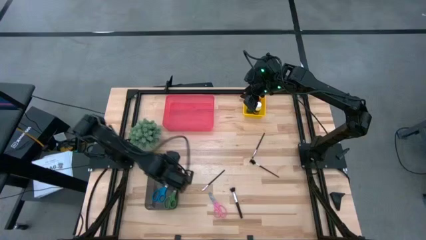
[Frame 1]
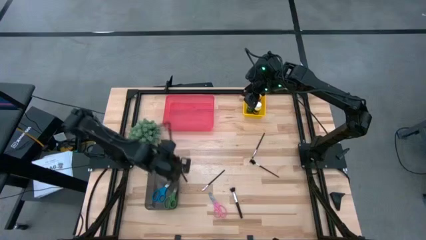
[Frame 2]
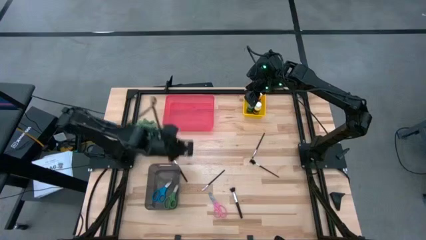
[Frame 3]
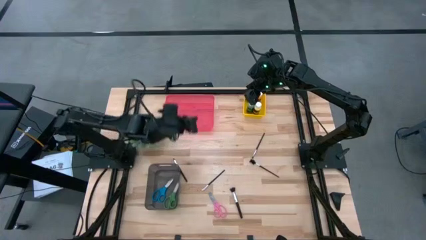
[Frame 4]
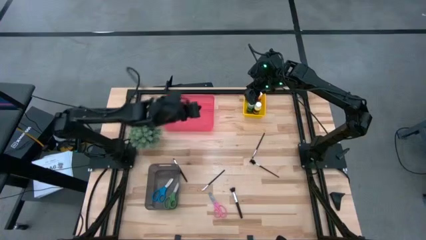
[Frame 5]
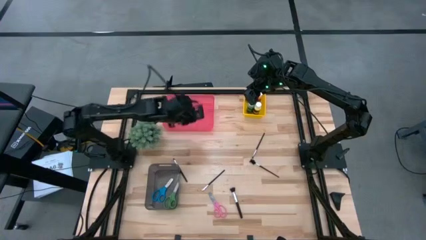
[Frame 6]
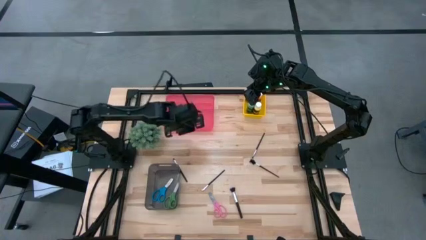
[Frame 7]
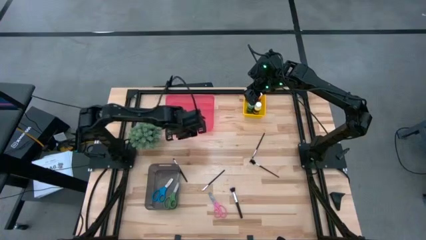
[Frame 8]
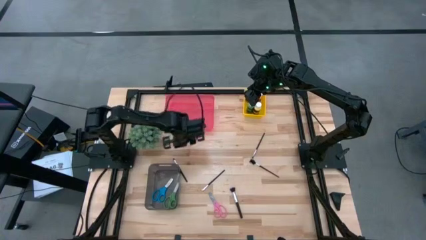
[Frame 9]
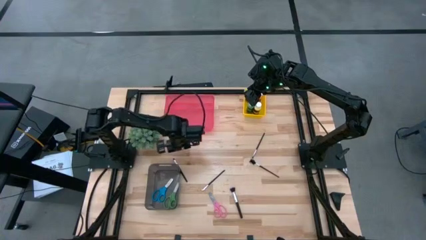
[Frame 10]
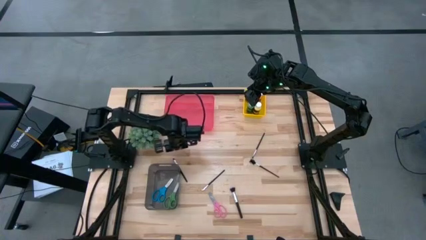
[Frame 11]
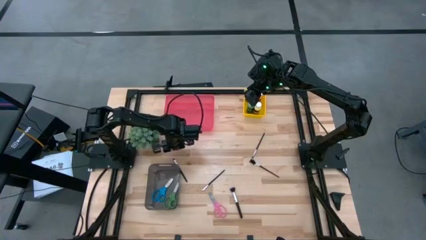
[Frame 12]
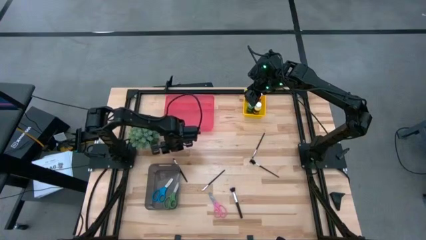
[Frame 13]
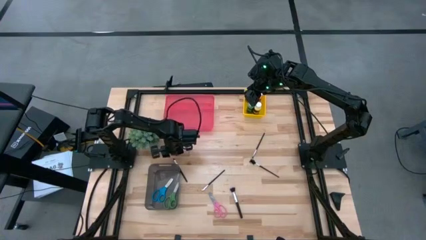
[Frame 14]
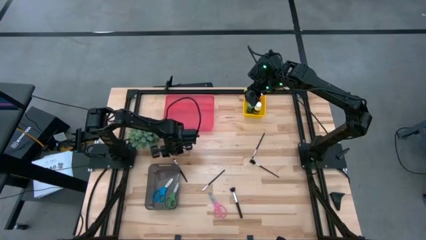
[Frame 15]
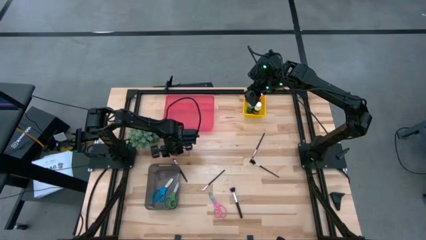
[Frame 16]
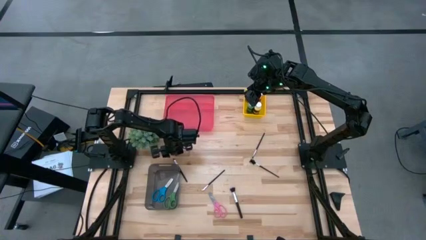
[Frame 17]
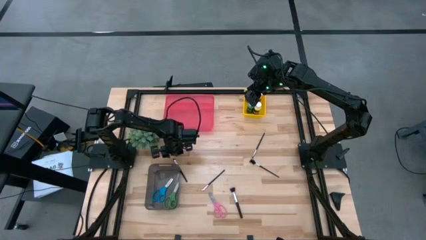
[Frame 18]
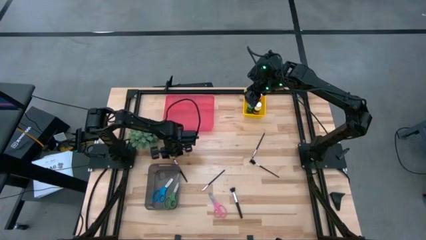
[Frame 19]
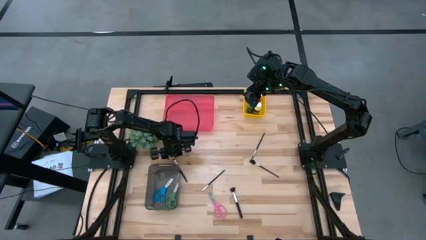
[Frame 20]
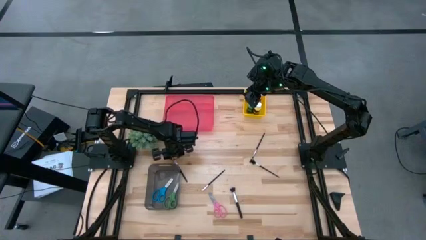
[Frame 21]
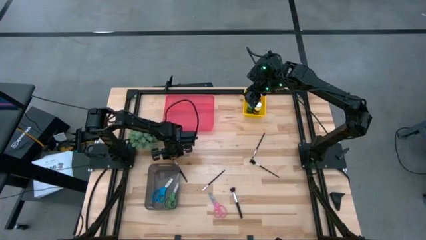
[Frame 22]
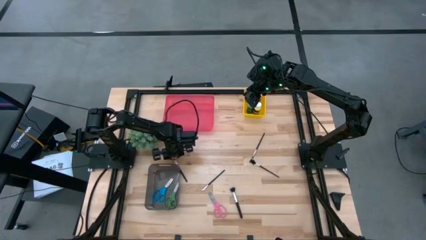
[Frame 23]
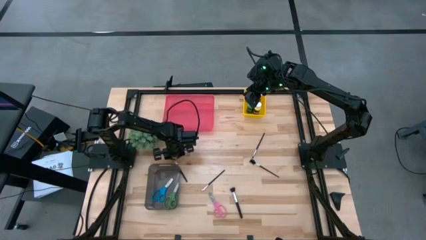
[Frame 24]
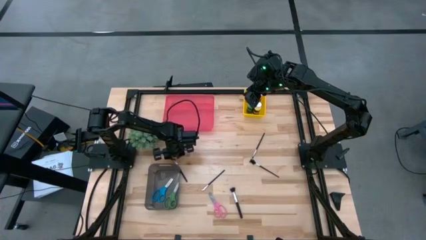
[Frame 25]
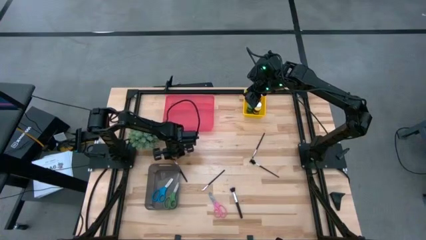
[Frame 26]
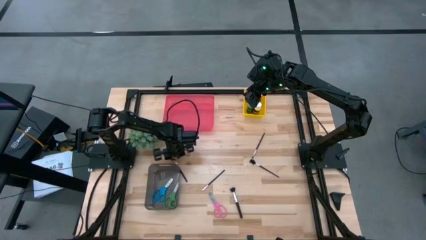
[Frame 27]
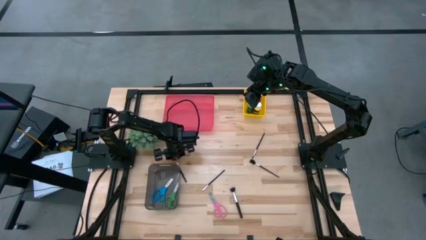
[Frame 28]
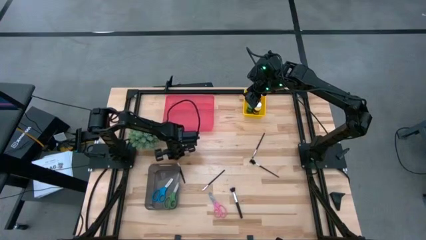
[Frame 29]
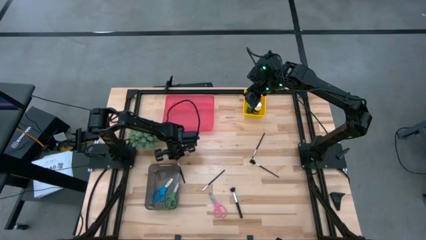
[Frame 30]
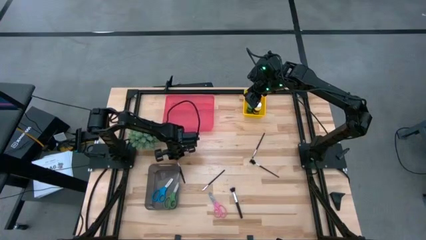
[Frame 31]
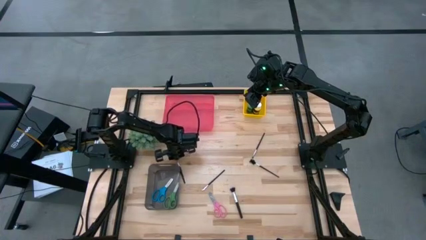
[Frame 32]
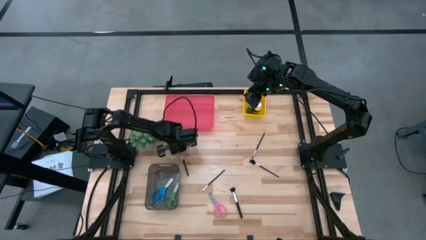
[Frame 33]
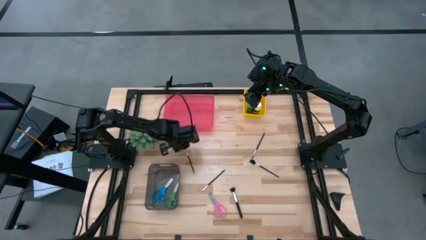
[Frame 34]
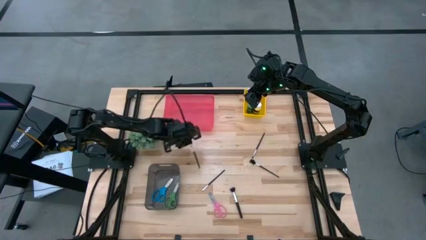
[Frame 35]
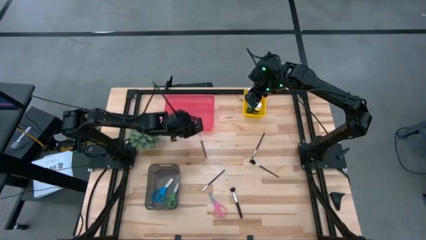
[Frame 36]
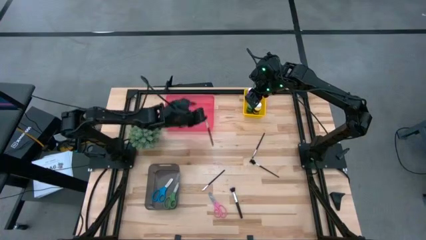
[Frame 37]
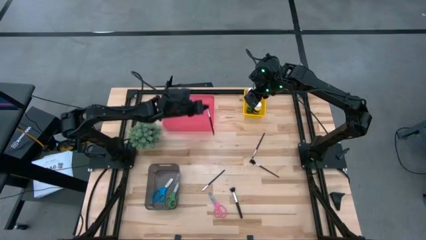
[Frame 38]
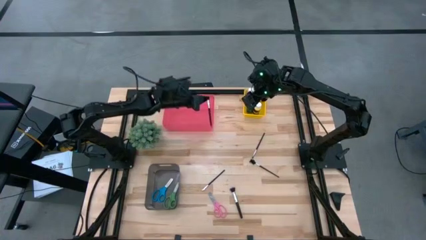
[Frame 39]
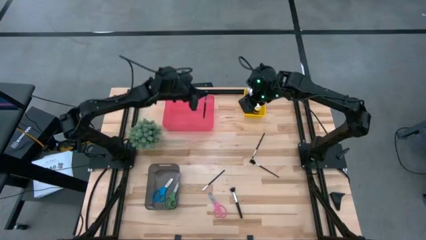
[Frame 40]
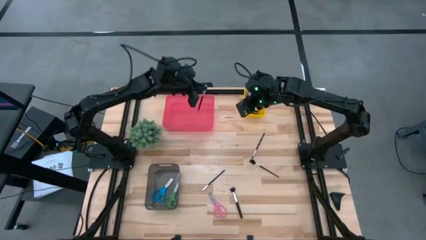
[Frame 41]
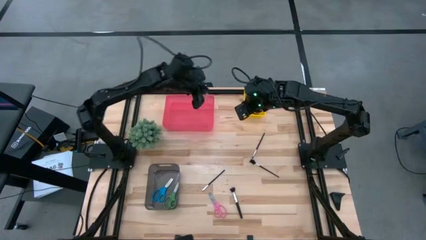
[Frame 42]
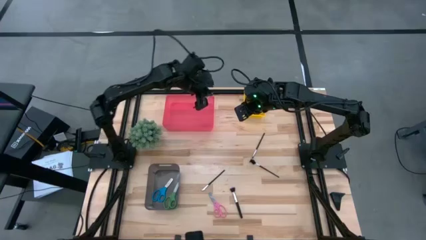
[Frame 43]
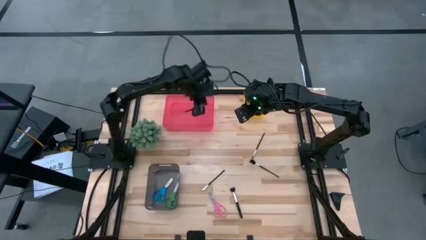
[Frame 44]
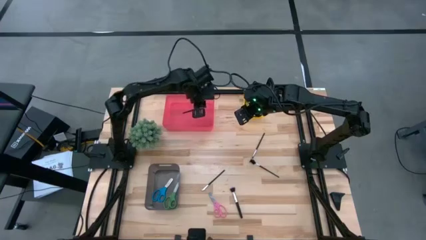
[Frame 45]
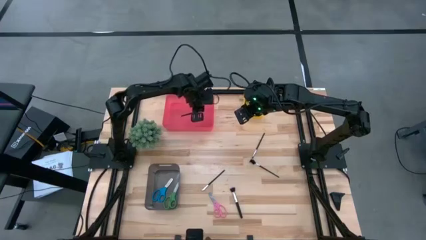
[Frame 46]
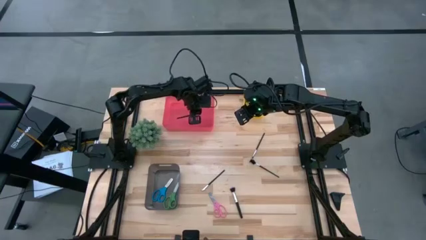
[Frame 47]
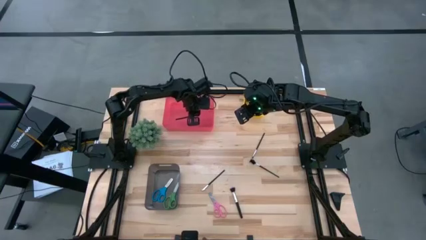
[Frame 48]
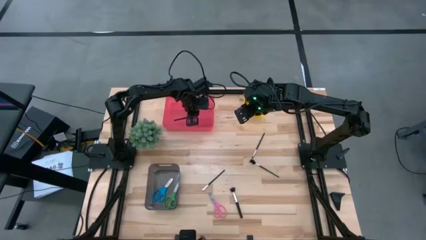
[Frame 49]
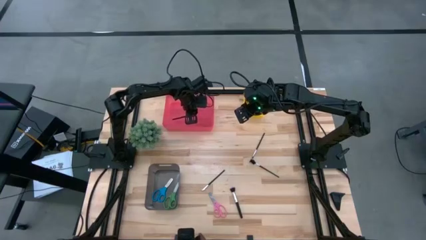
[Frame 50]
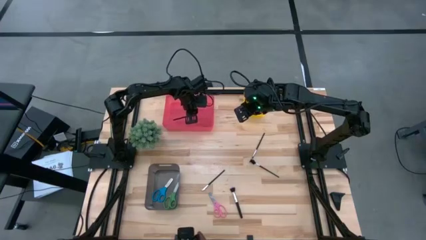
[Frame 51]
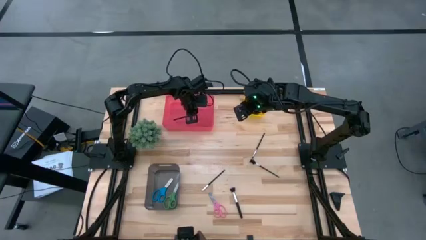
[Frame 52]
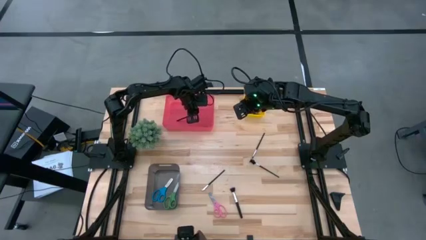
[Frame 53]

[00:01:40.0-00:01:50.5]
Task: Pick & Place Paint Supplies
Put the left foundation brush into the red bin

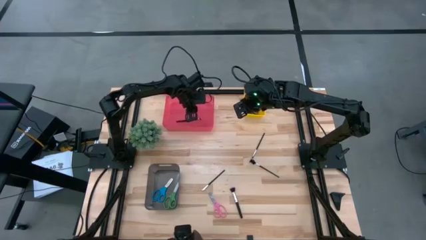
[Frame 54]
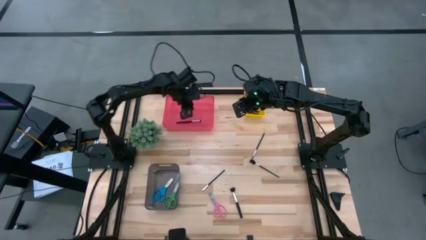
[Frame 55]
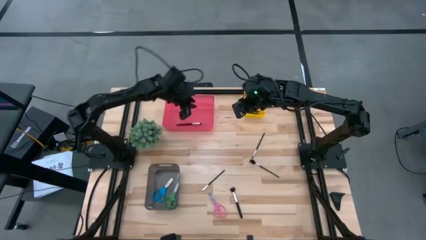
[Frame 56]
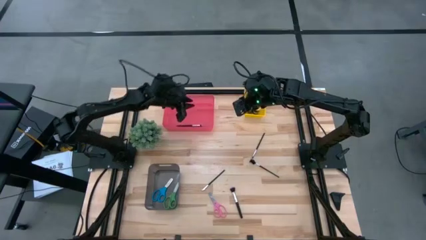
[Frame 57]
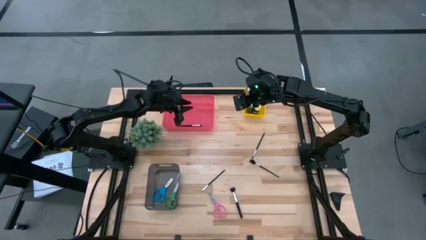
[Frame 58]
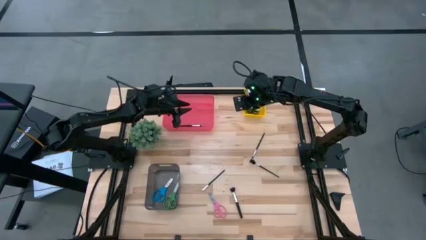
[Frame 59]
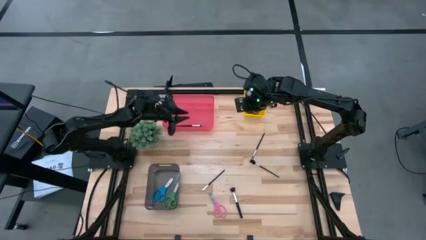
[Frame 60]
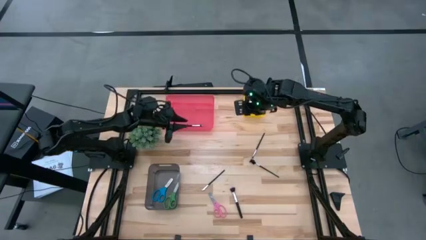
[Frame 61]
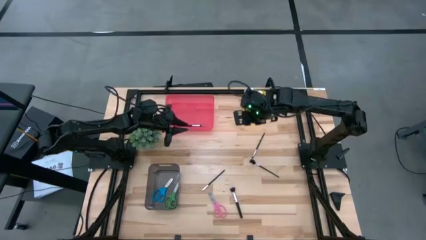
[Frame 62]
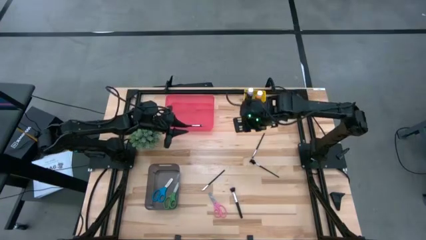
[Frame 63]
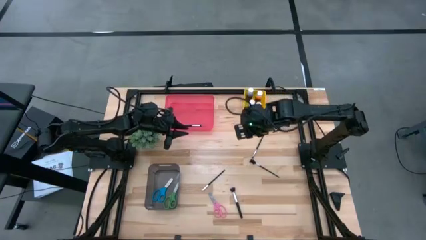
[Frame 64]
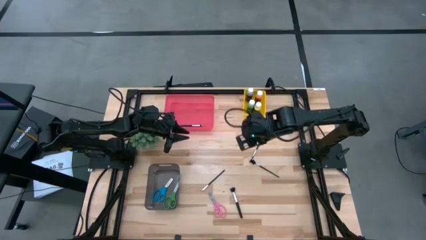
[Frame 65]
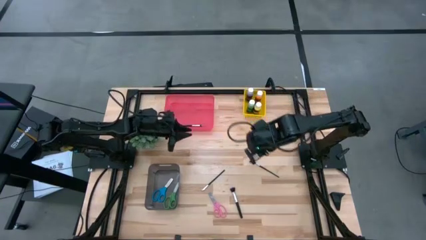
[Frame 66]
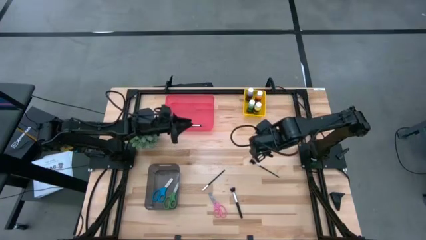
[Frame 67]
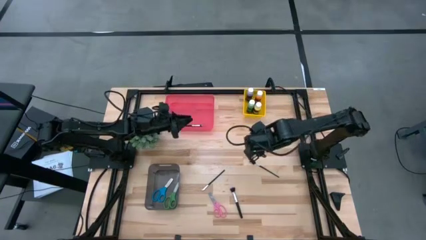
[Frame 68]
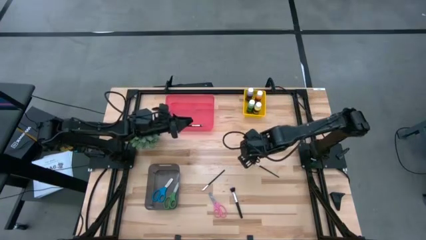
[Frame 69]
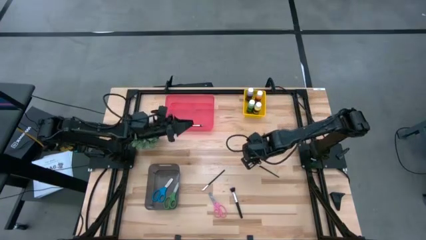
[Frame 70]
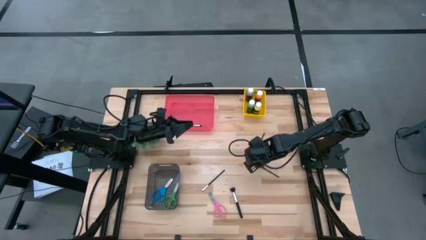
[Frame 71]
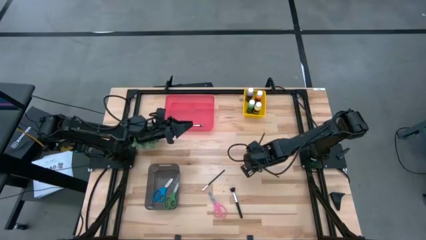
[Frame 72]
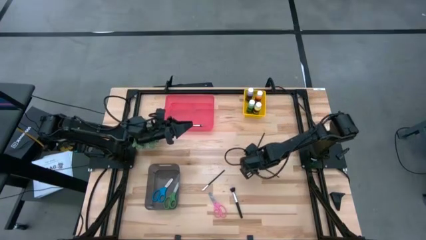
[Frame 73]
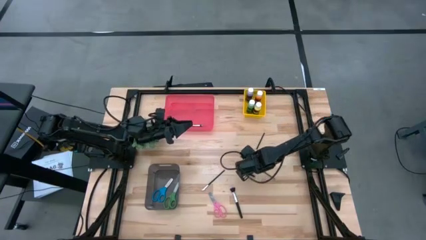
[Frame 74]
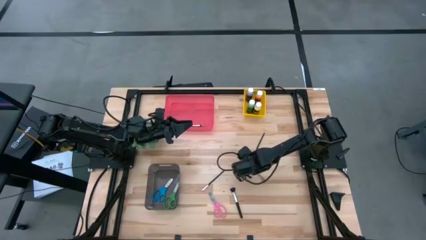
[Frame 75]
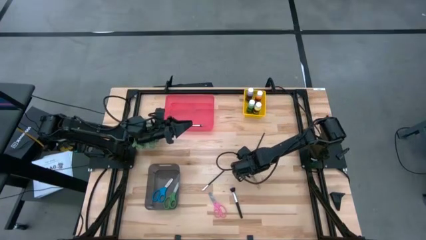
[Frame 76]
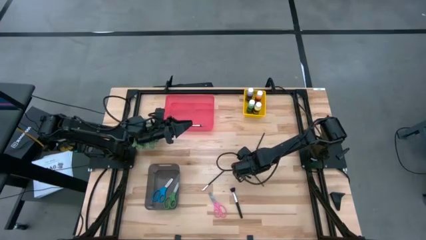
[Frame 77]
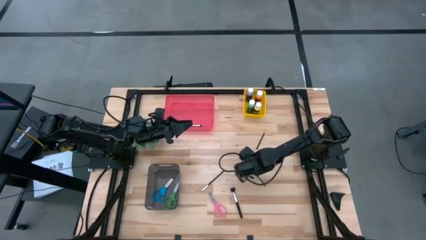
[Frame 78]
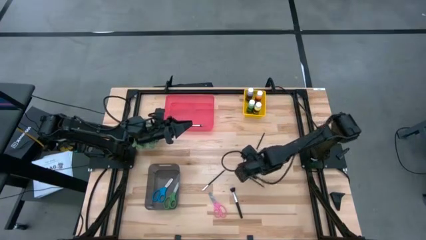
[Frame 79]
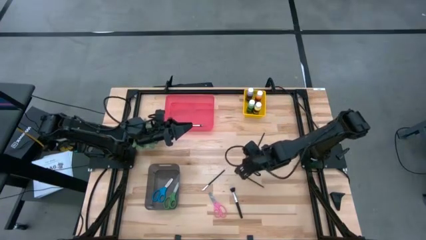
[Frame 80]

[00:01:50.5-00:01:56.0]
Put the brow brush into the red bin

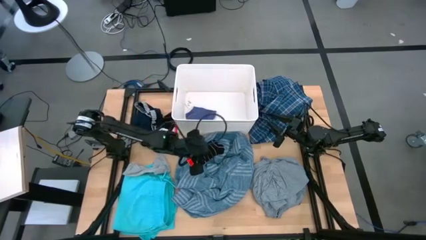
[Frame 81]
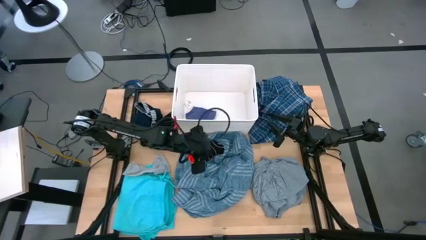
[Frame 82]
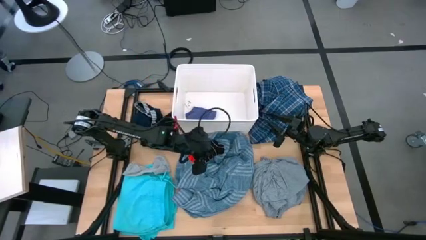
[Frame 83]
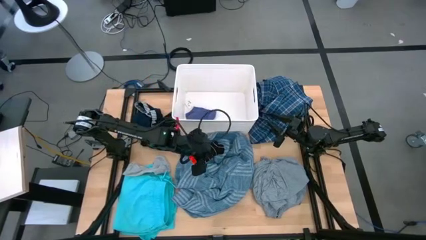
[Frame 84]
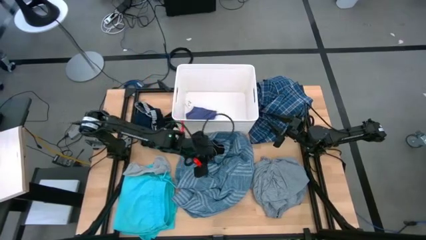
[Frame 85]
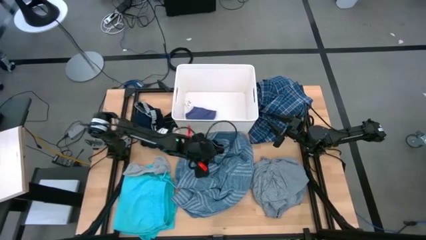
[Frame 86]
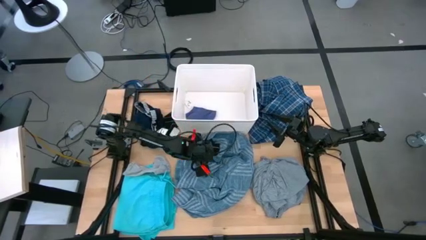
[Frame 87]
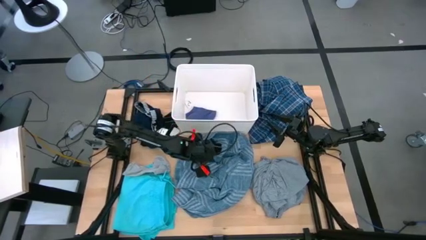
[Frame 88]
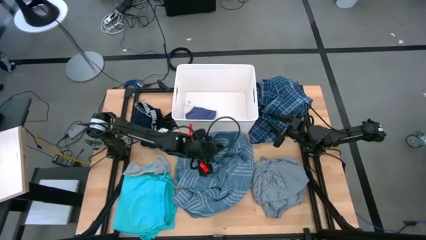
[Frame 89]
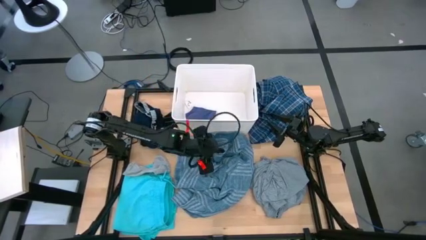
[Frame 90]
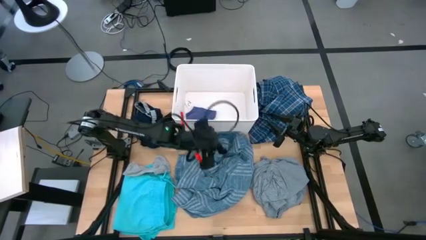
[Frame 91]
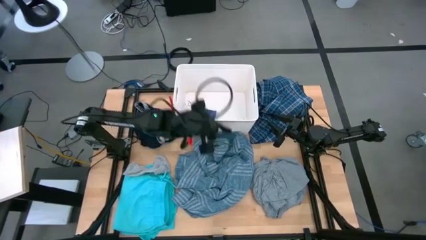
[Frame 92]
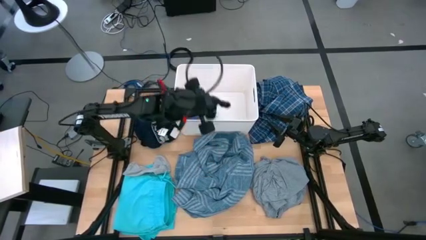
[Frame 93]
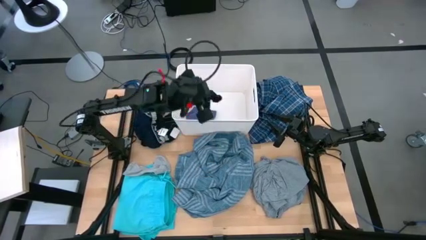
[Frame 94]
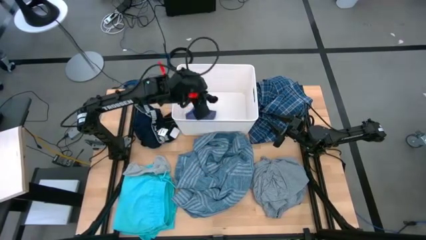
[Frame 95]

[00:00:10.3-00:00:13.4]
Task: Sort clothes
Put the black sock into the white laundry bin
